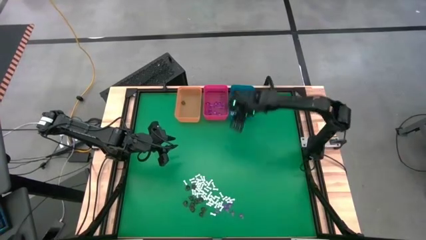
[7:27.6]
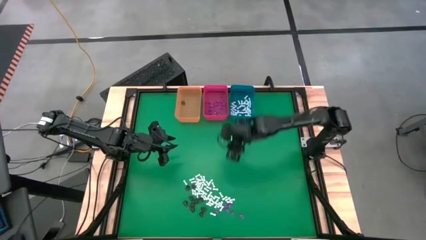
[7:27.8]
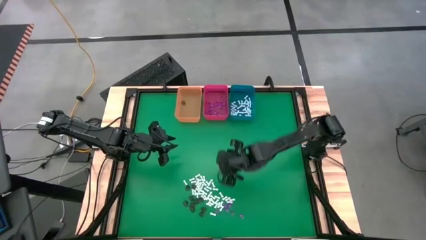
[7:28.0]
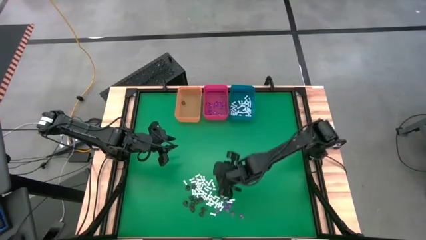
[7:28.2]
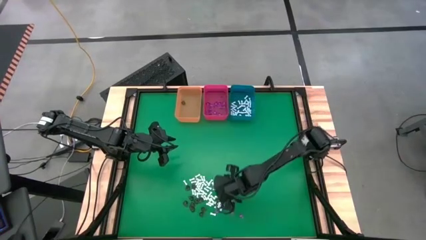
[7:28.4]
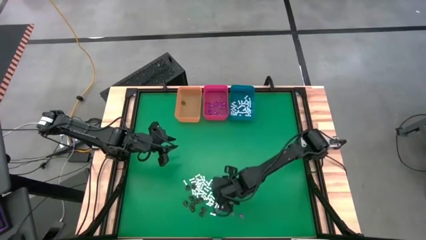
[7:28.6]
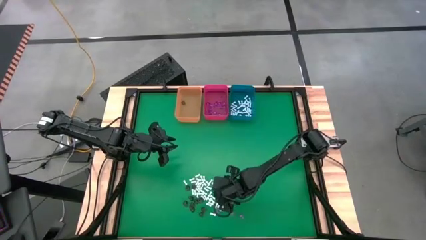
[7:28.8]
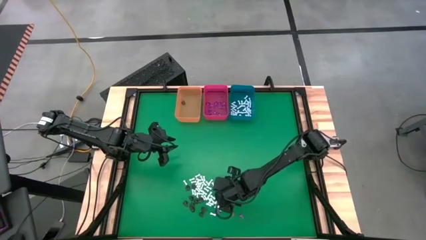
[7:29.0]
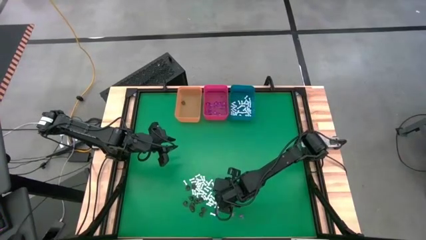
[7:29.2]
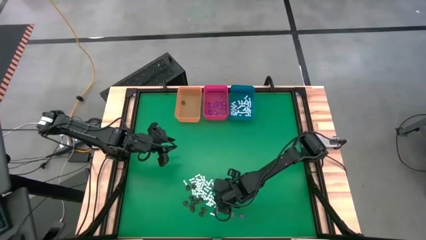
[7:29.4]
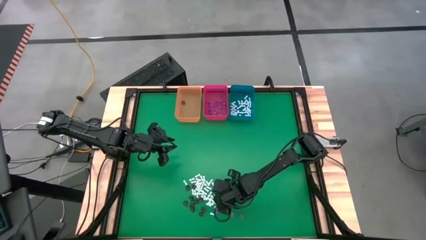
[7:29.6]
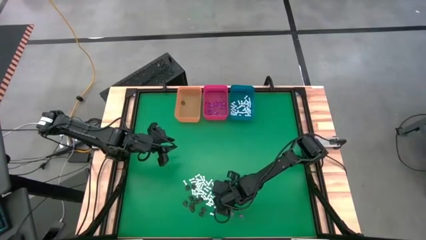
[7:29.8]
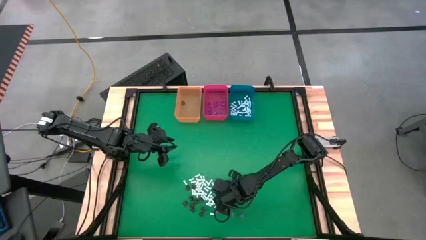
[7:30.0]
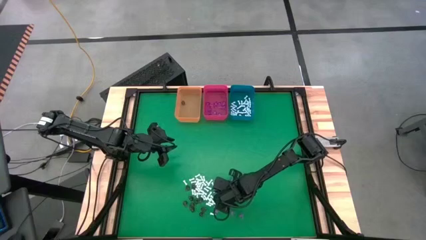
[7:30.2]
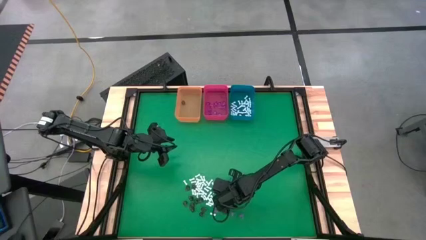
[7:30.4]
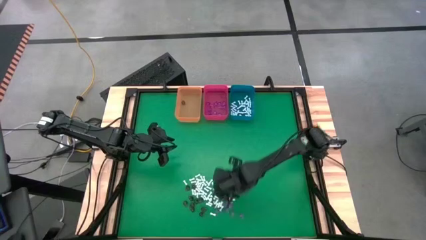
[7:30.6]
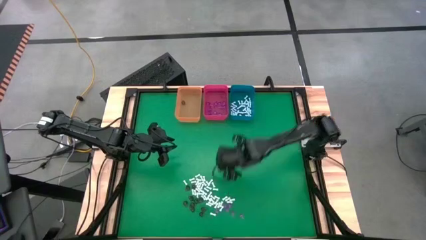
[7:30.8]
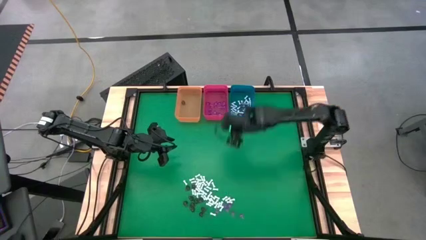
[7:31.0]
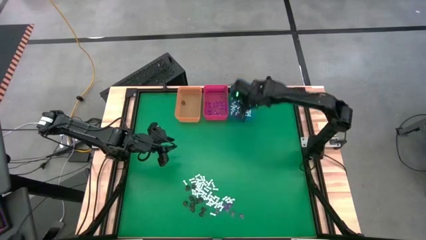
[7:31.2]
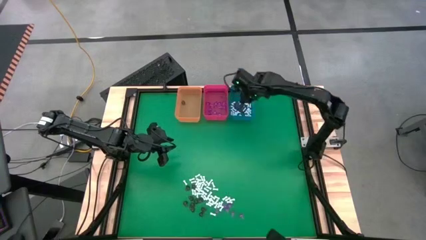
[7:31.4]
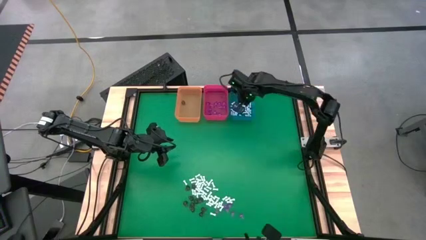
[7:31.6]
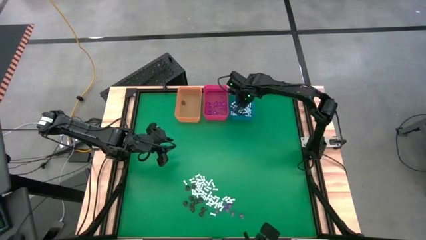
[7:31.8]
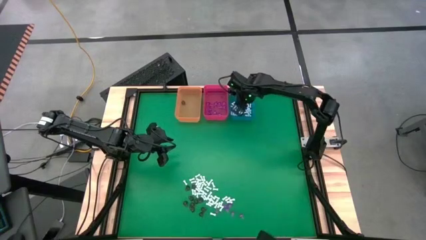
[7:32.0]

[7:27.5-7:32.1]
Task: Sort Halloween decoration
Put the white bone toy into the blue bin

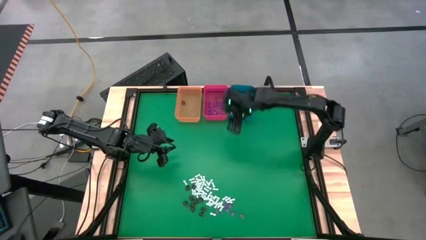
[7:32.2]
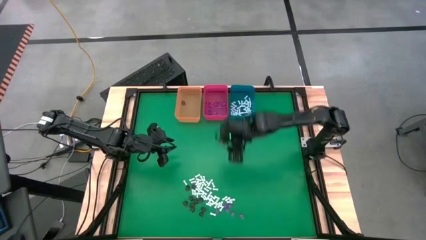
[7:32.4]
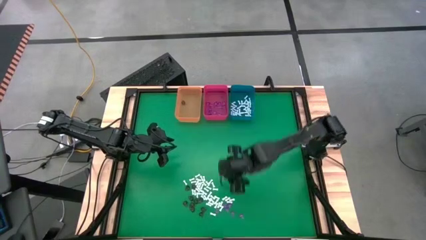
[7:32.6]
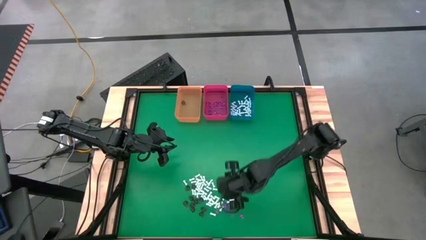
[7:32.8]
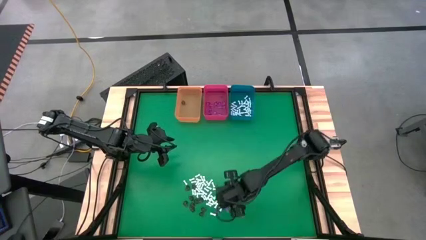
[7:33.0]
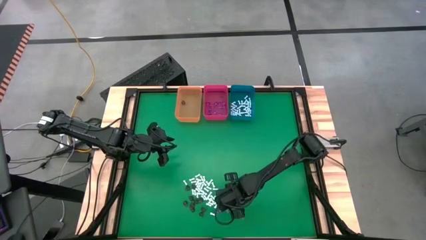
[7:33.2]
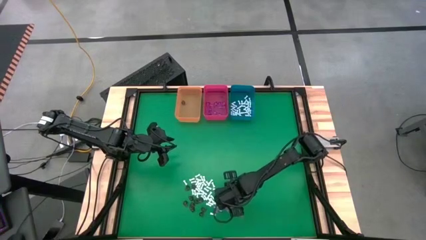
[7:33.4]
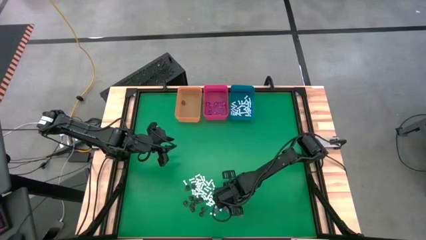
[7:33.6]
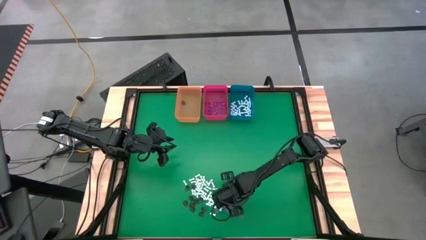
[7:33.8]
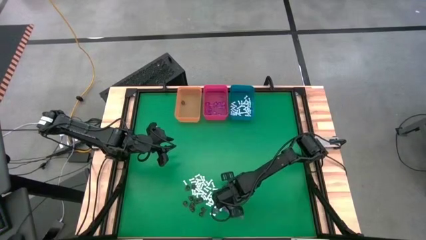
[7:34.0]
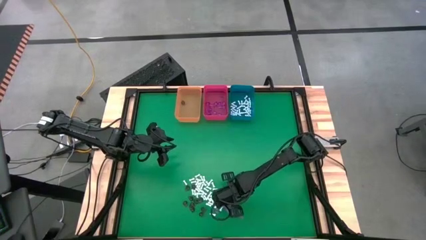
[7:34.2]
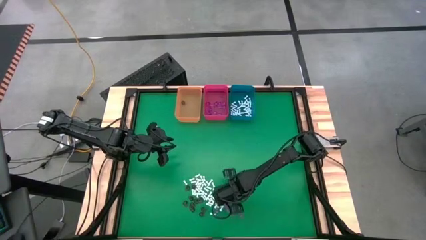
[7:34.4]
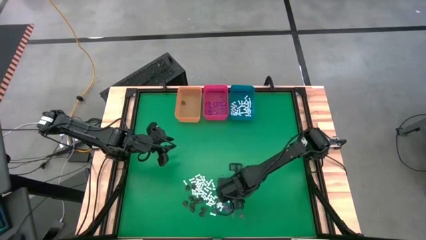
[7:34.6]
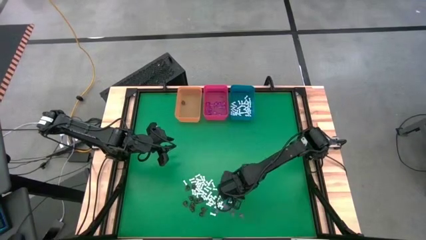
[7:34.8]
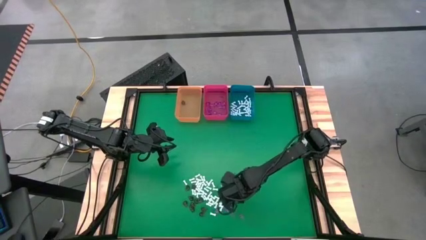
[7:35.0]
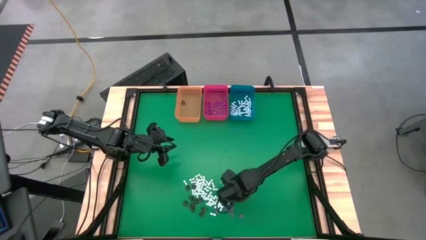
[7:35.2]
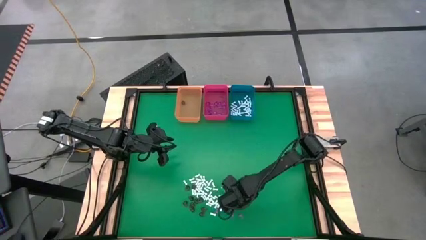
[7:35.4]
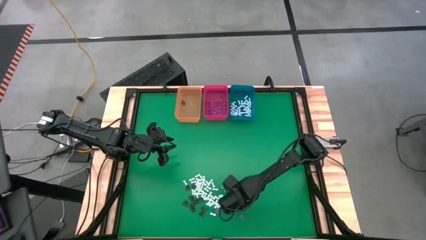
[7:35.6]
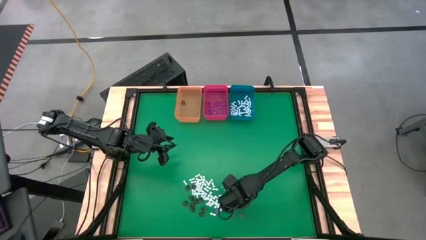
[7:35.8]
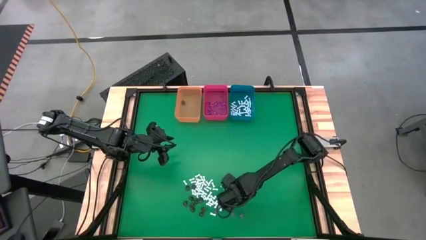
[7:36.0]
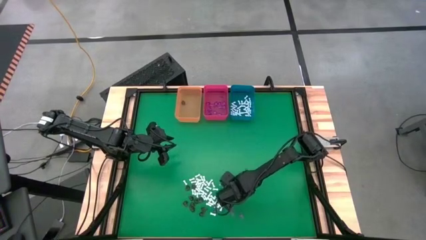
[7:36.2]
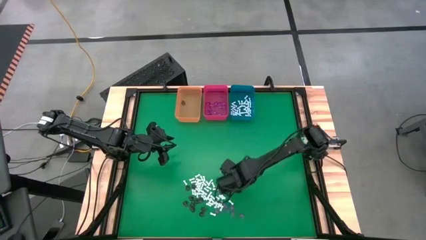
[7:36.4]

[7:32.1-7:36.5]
Put the white bone toy into the blue bin

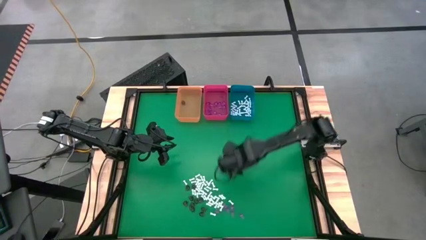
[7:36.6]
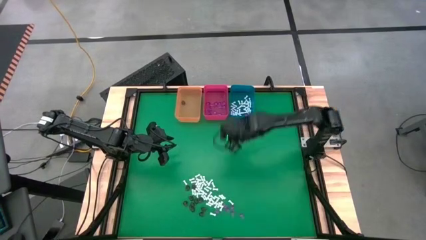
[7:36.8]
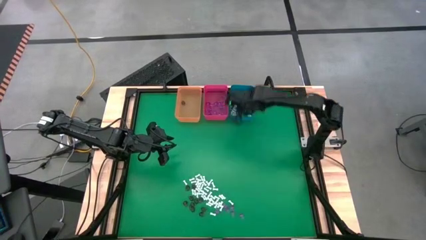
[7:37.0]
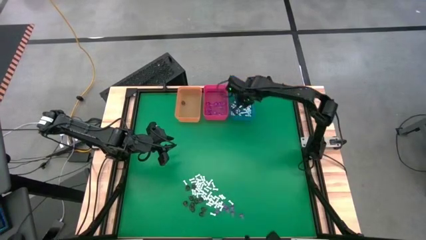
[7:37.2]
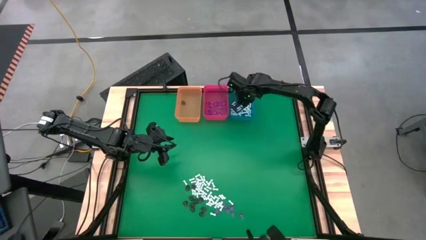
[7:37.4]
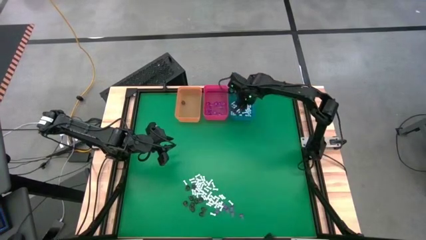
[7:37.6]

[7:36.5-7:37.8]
Put the white bone toy into the blue bin

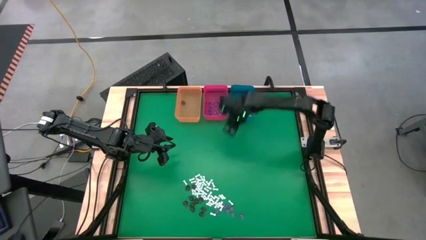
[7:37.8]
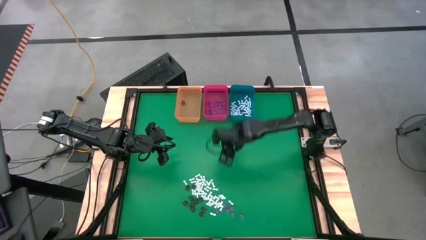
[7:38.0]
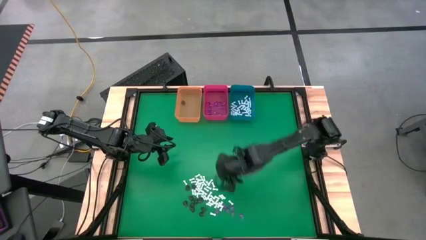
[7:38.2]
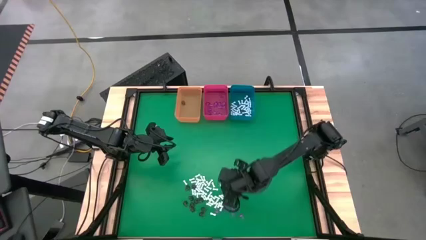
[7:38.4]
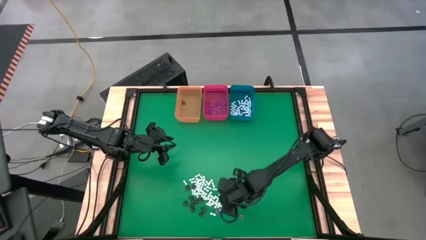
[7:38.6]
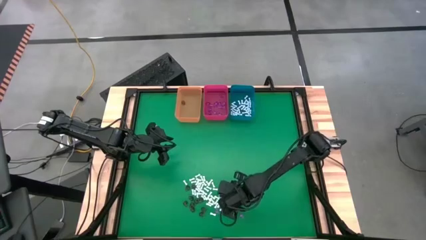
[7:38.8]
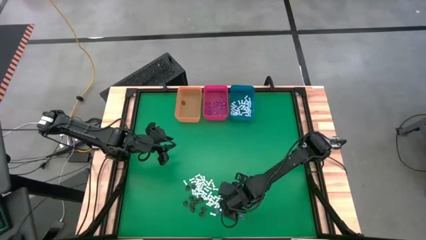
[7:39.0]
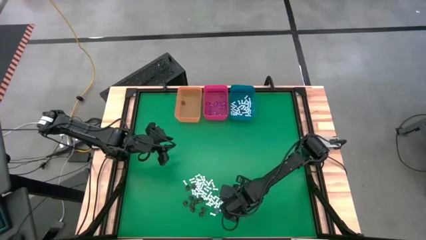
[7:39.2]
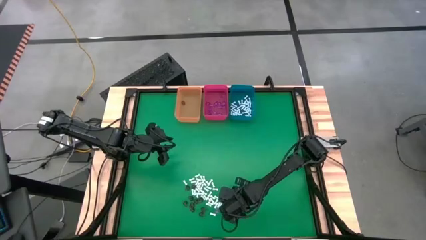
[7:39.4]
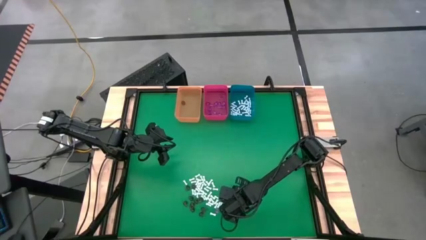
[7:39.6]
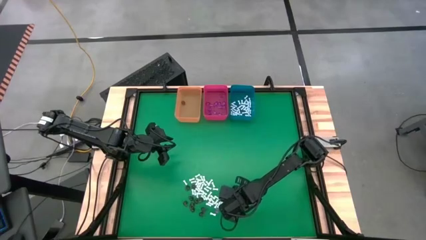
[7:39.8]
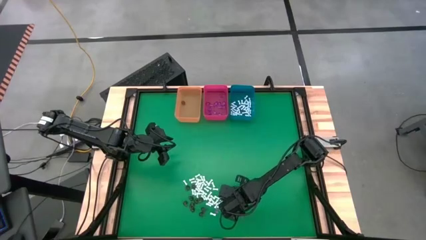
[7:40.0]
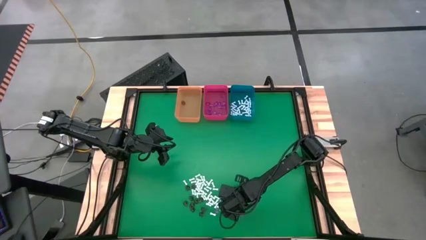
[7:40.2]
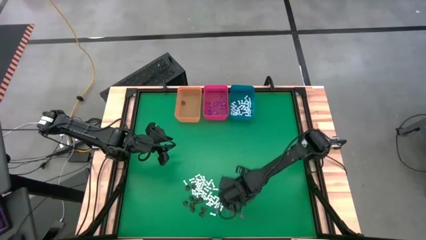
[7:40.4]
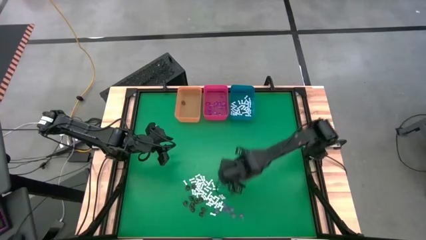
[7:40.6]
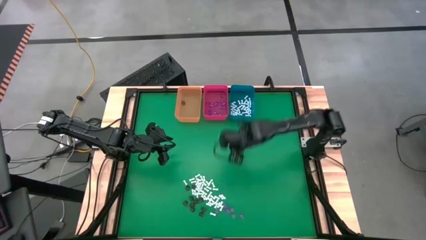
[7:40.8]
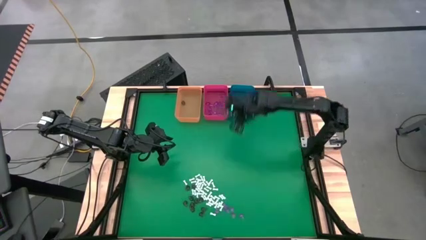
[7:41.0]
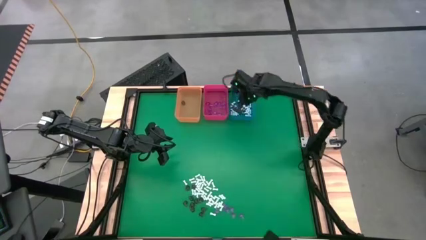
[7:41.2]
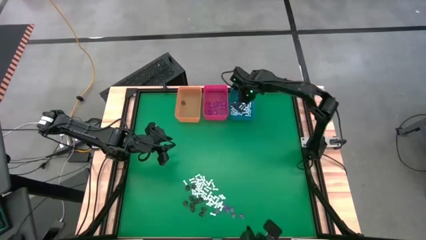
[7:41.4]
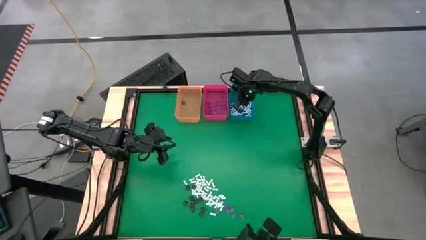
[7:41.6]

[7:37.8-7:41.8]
Put the white bone toy into the blue bin

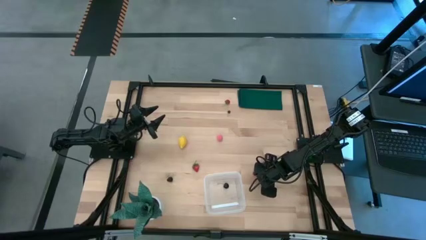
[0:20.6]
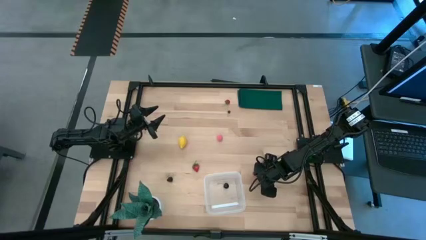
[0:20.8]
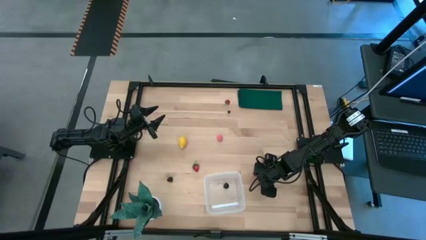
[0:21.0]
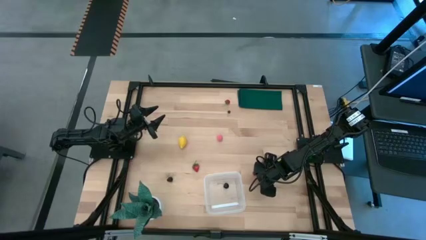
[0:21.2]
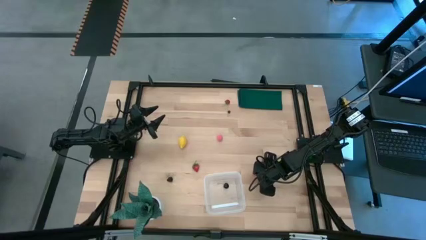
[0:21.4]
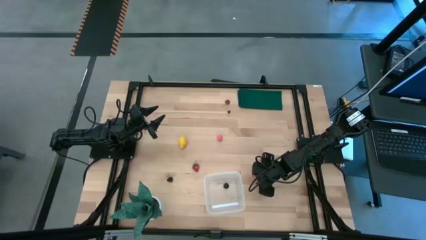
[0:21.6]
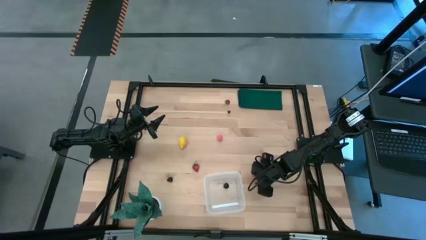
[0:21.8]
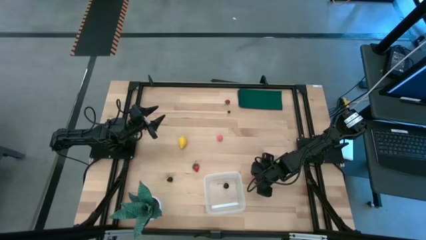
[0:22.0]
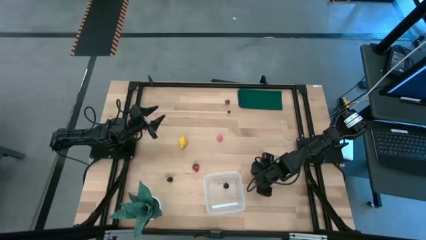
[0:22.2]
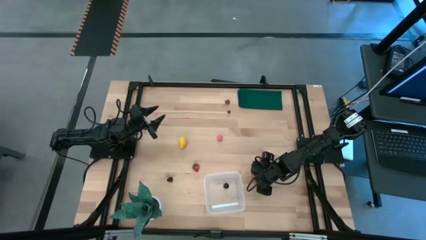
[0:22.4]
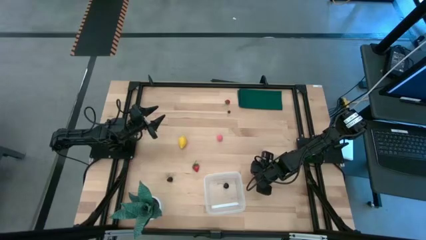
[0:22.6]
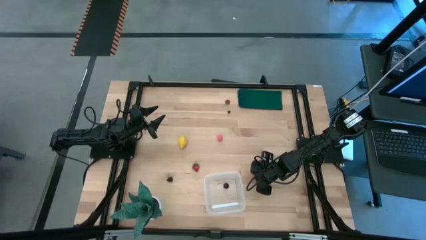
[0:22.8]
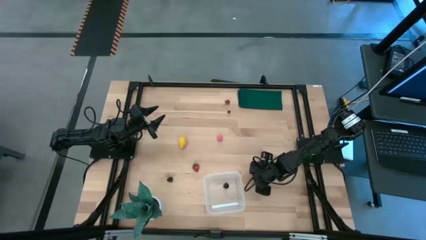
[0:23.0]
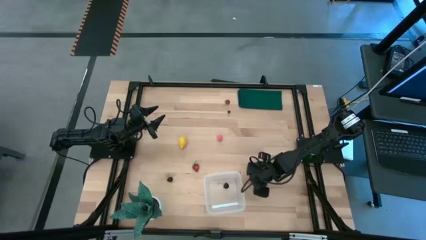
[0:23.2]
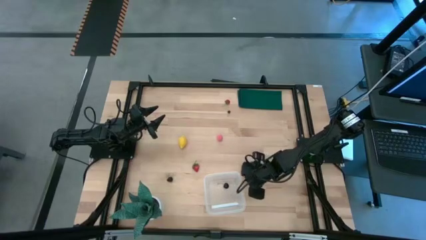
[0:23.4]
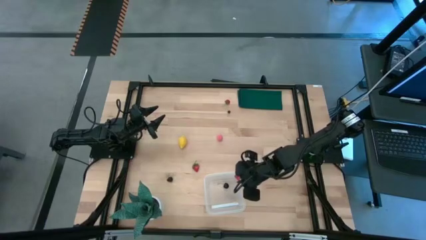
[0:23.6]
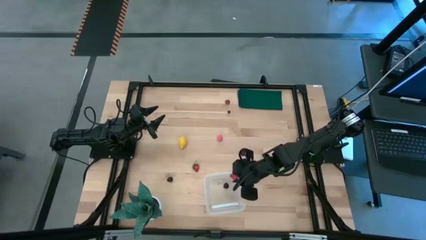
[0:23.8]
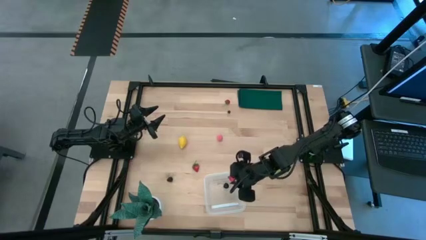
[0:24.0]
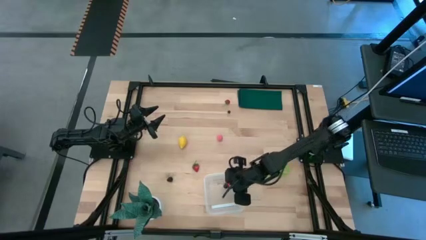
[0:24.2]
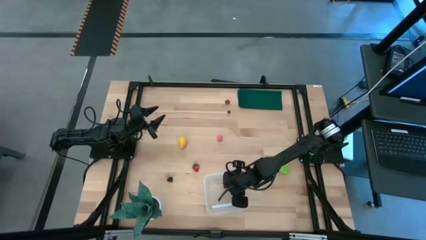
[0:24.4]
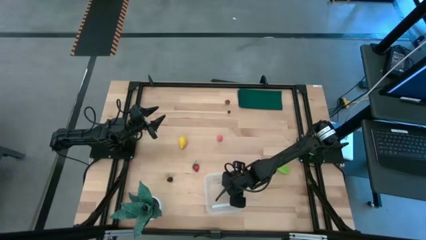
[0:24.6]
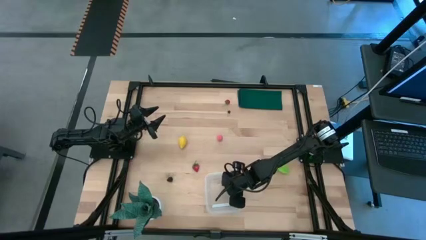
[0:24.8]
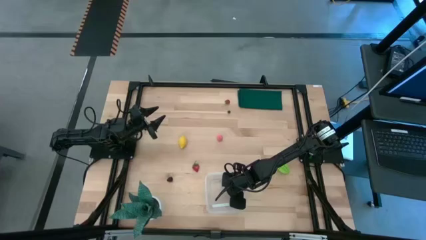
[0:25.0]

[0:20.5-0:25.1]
Task: Pick and placing Produce into tupperware
Put the bottom right red strawberry into the transparent bin
